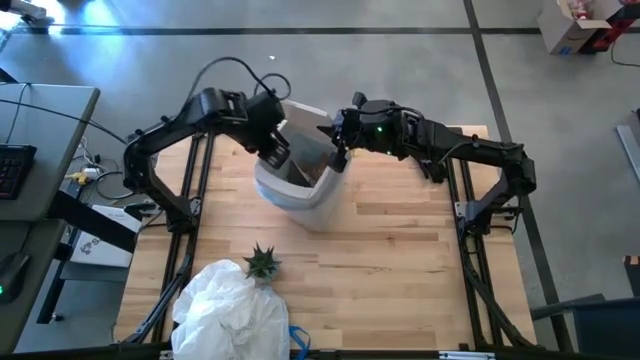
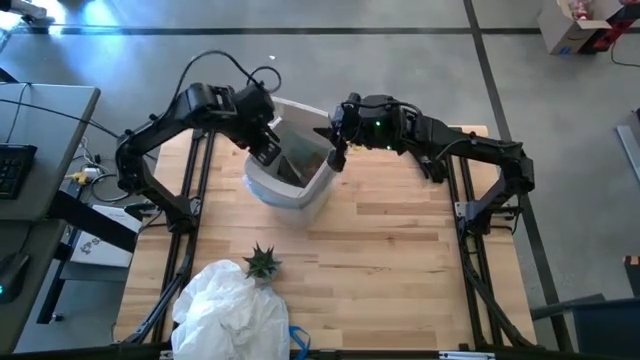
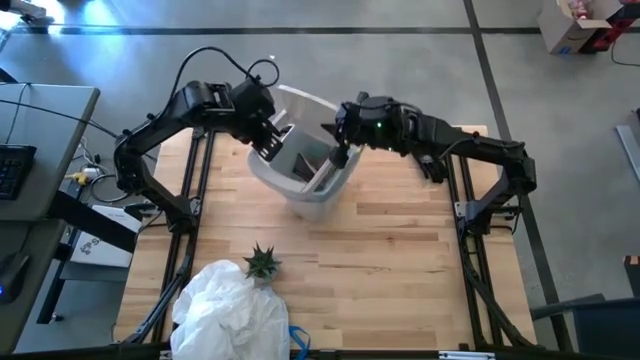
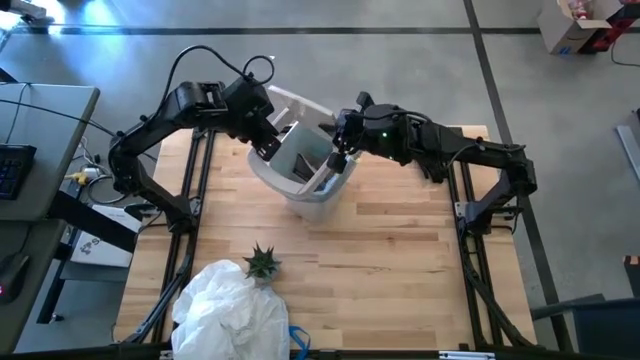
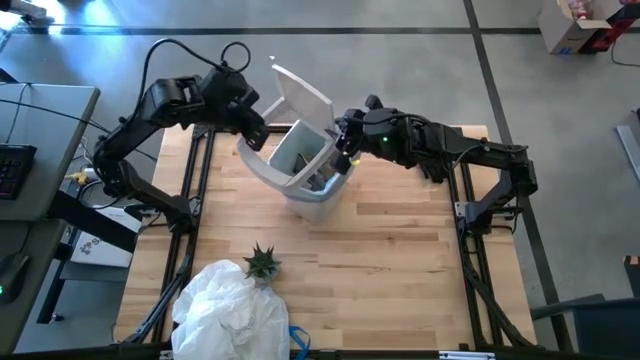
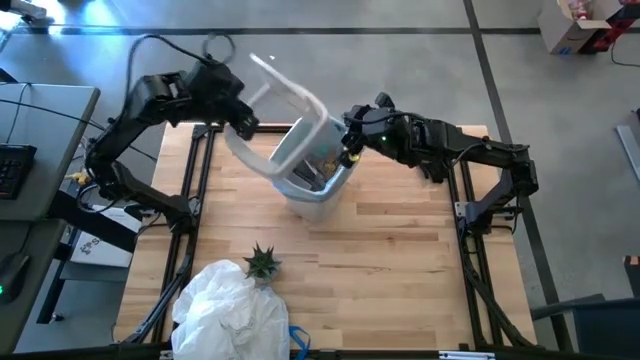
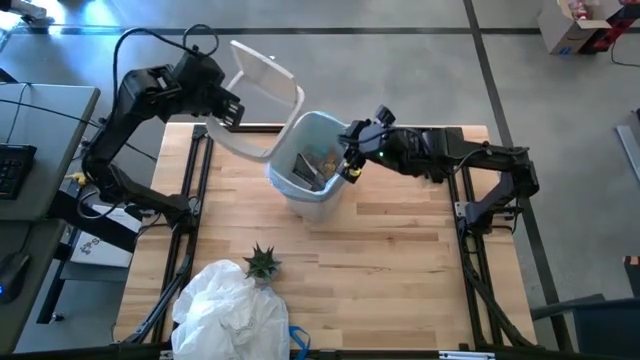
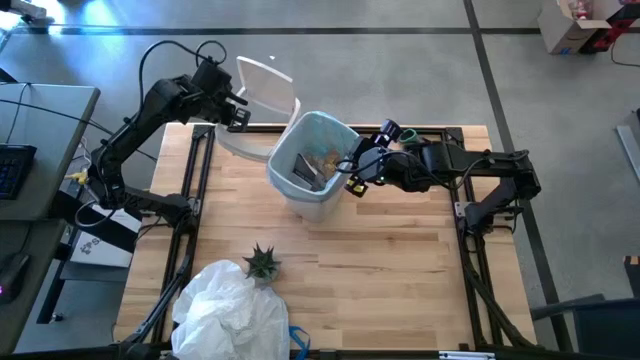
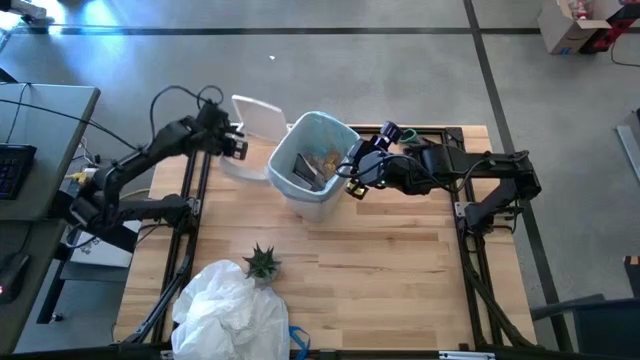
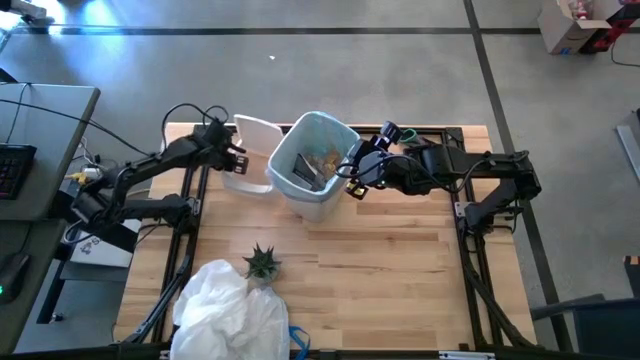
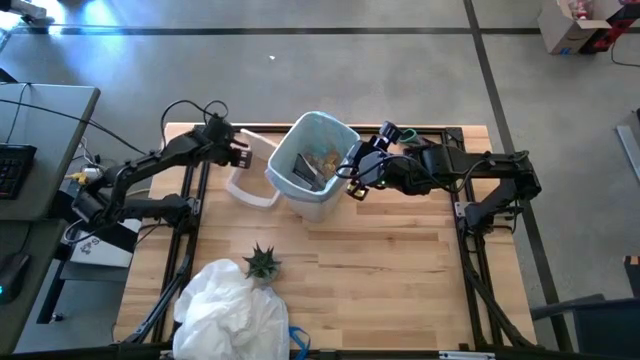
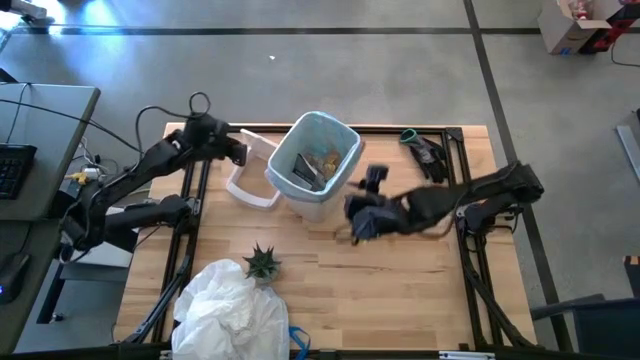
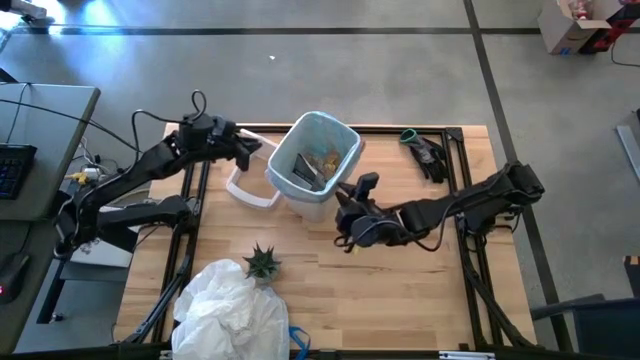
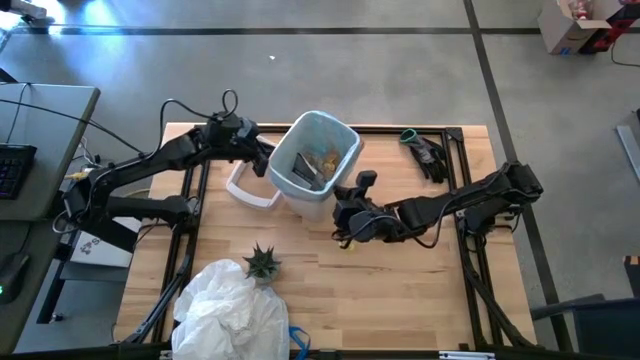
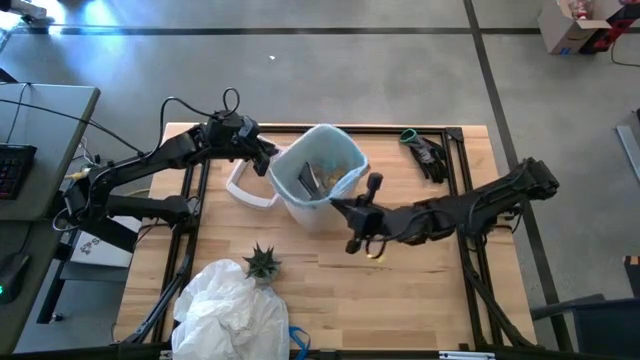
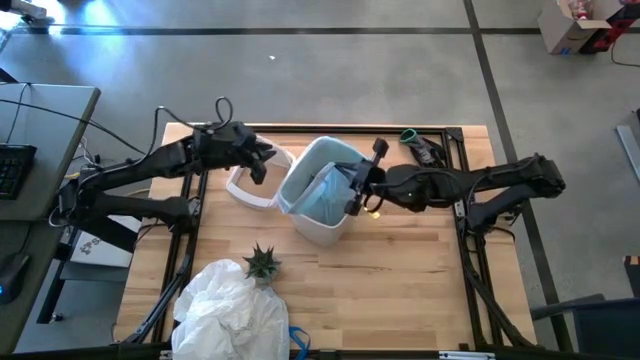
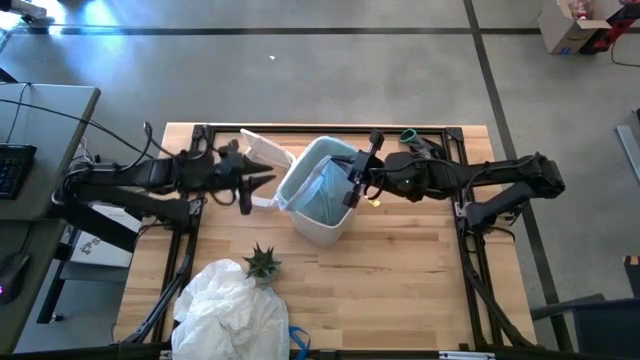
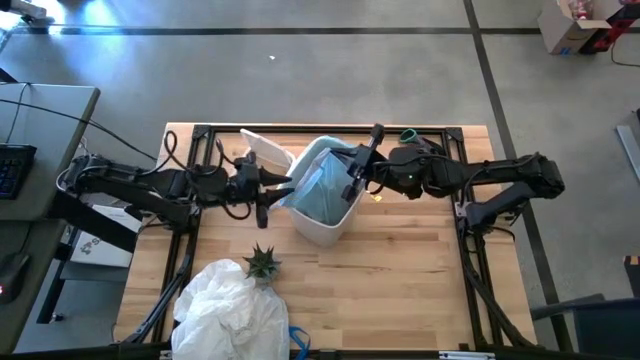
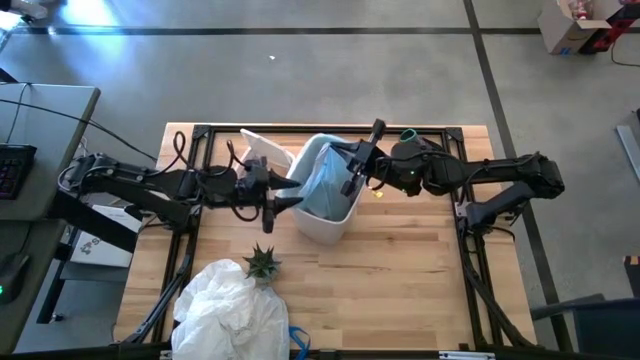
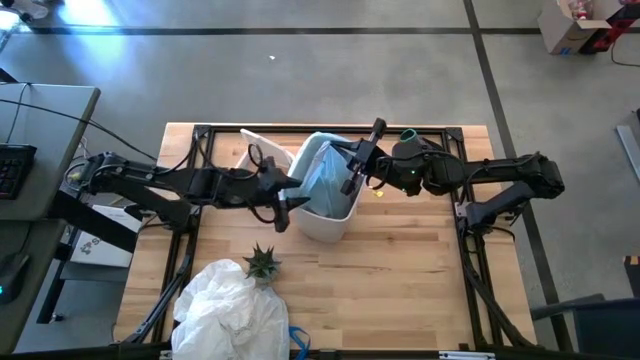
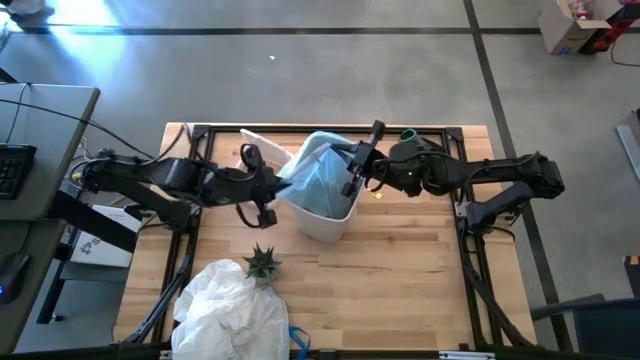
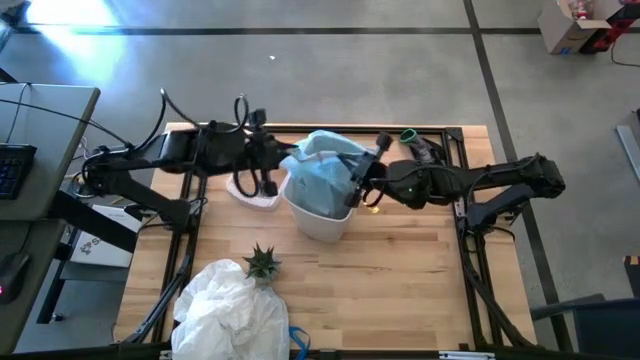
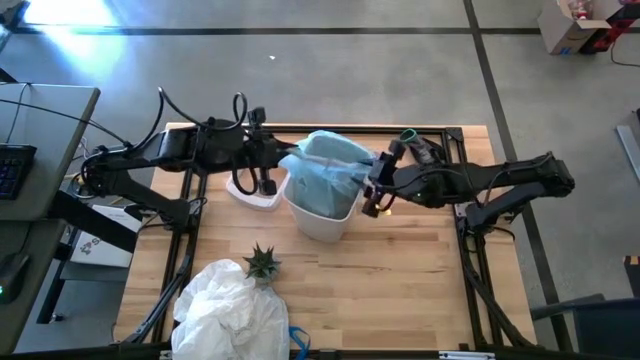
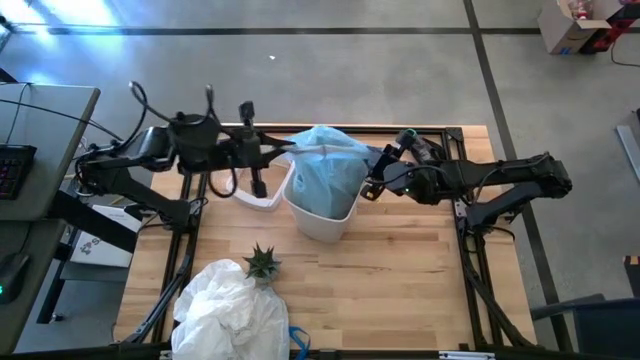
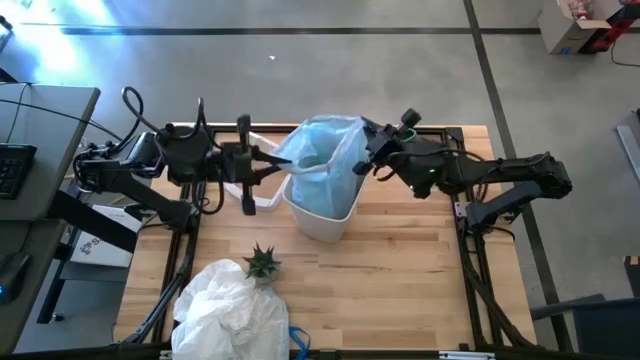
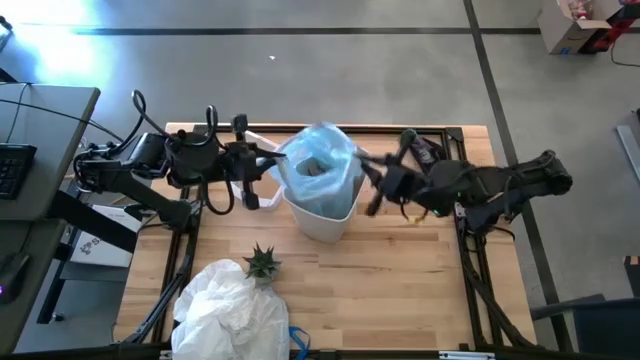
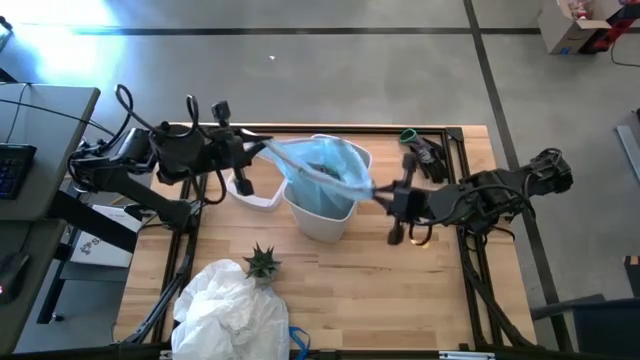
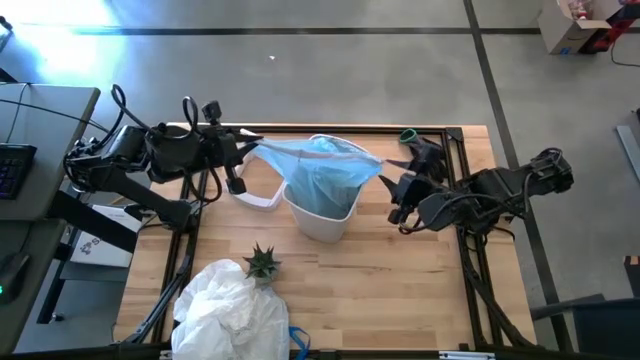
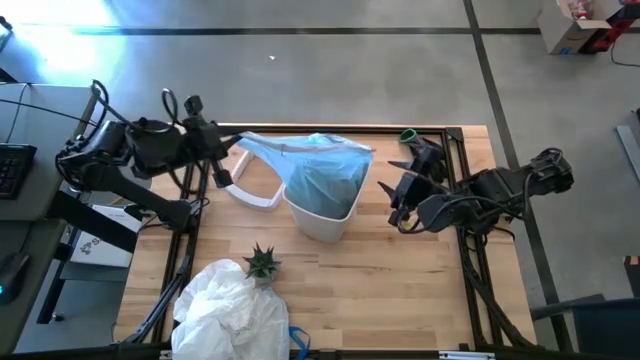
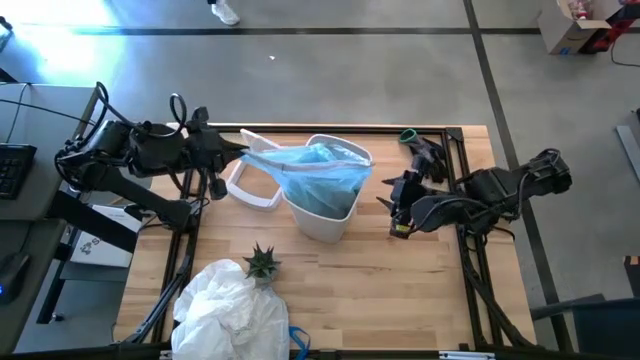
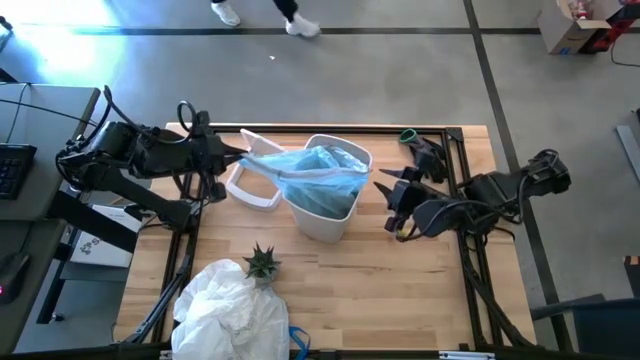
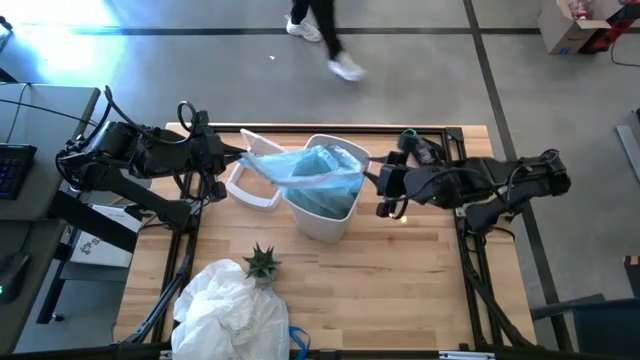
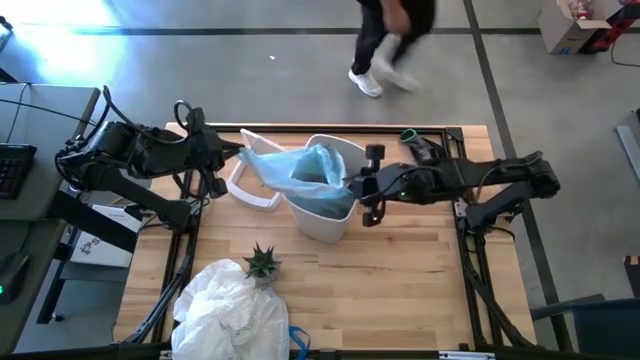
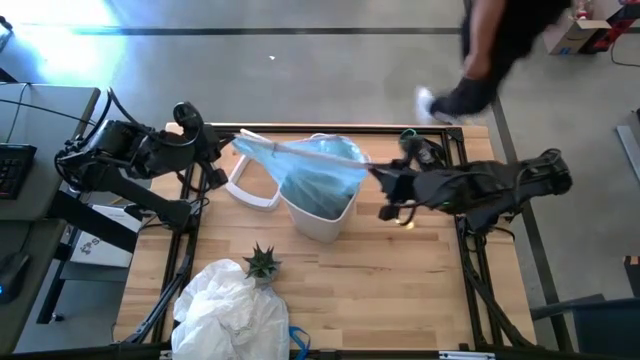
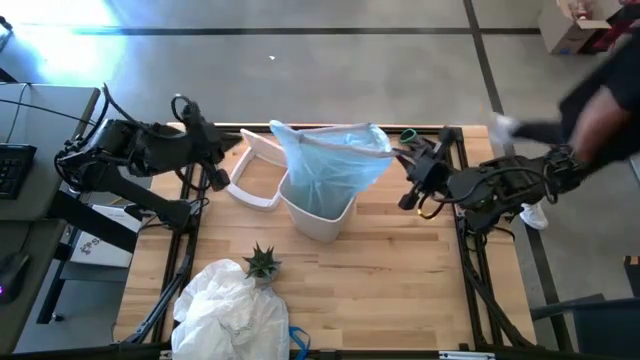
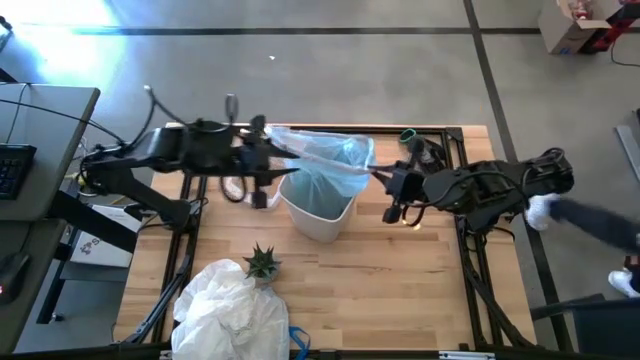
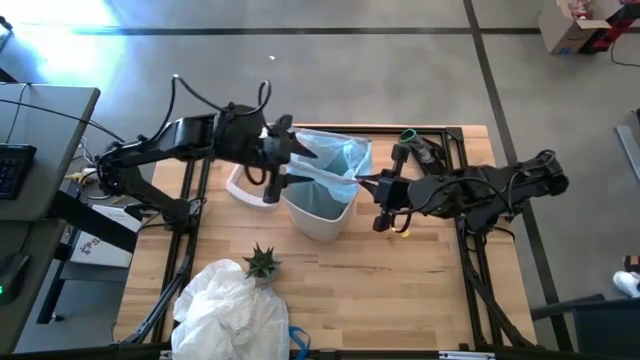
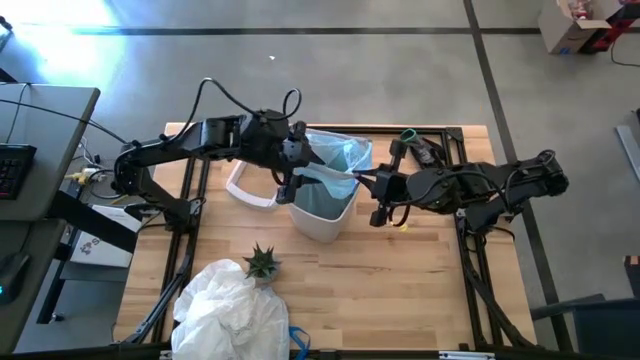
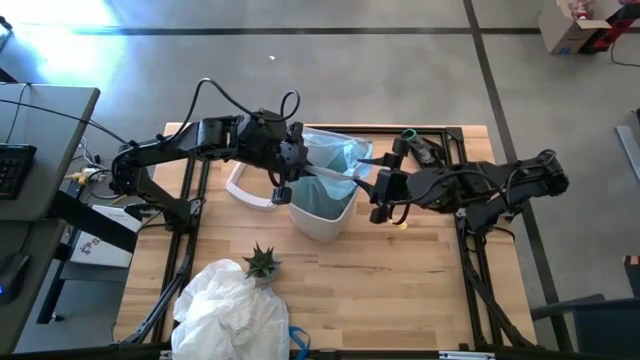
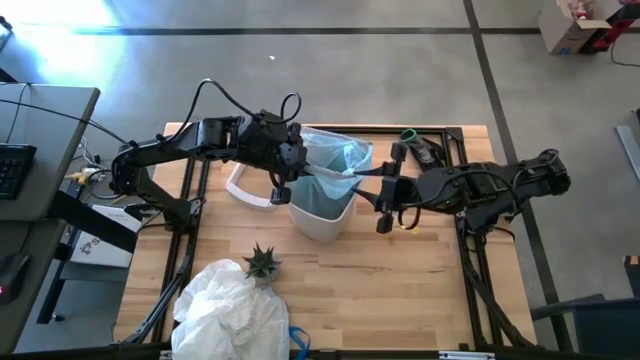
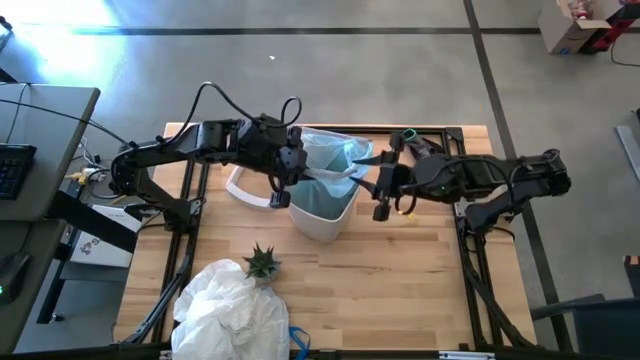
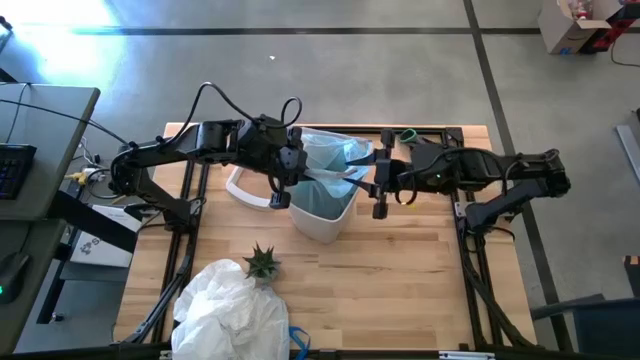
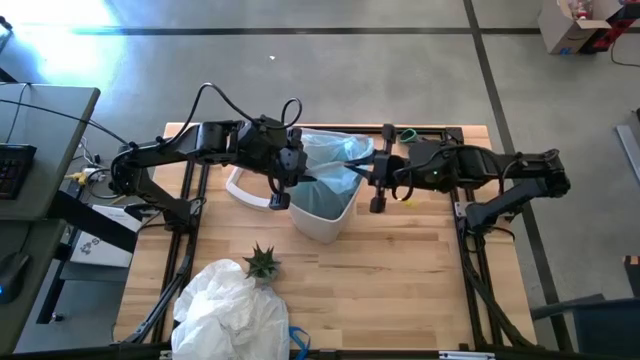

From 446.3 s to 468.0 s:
Task: place trash/remove bag and relplace
Remove the trash bag from the trash bin
